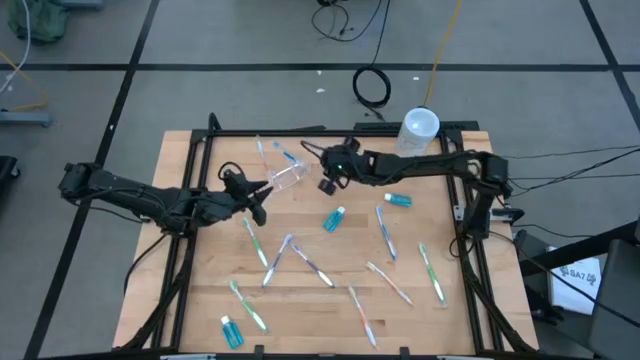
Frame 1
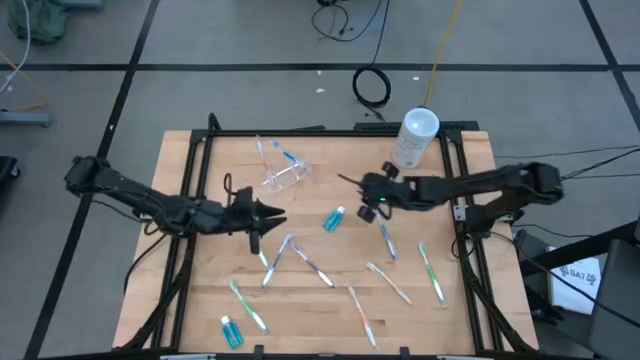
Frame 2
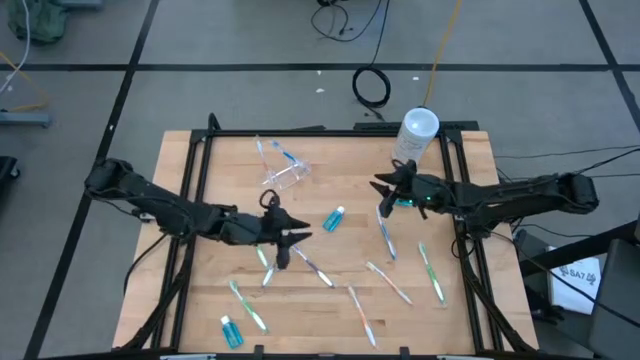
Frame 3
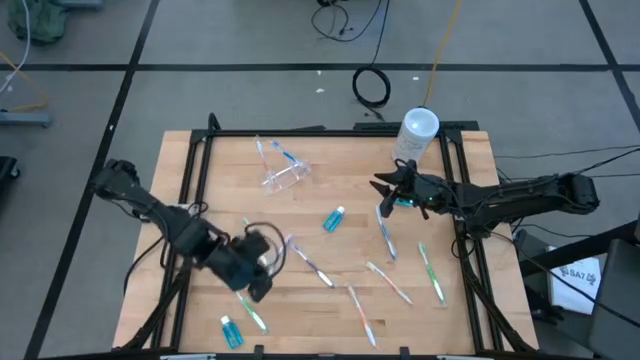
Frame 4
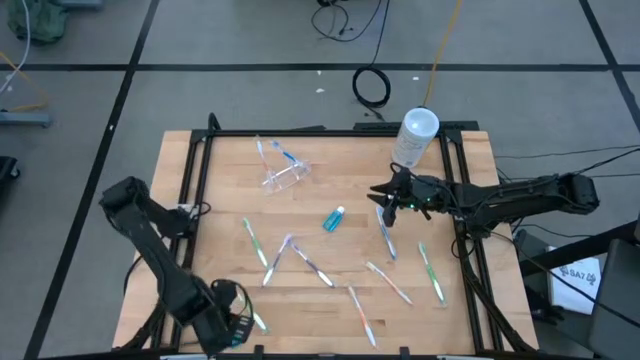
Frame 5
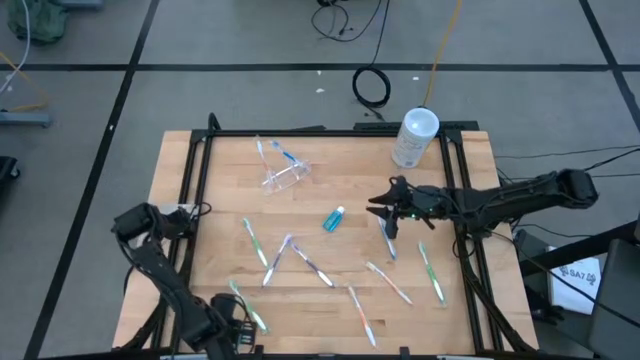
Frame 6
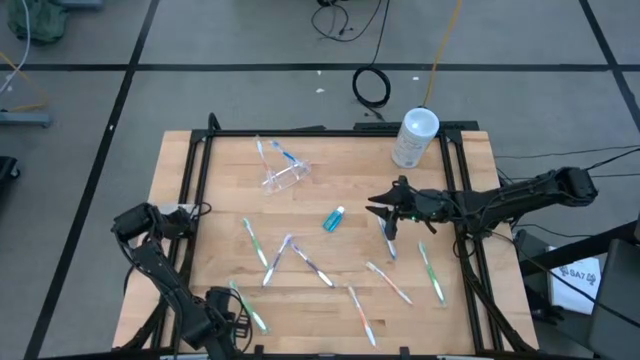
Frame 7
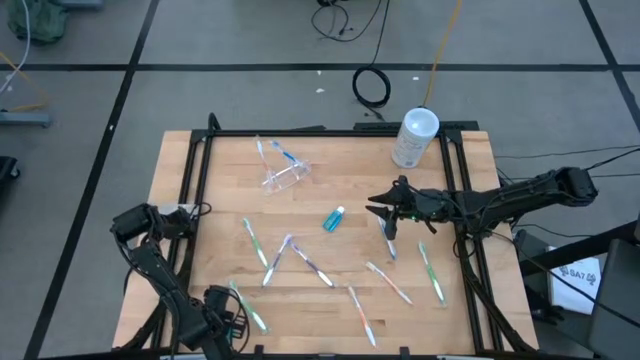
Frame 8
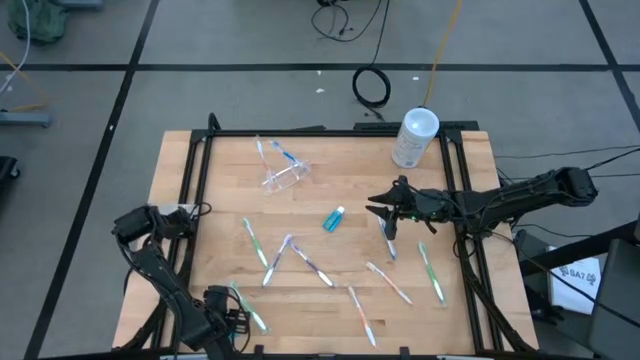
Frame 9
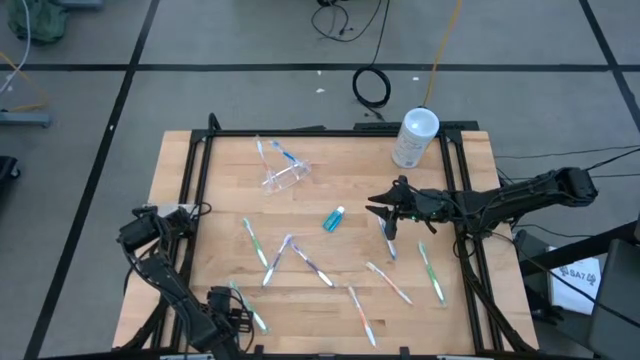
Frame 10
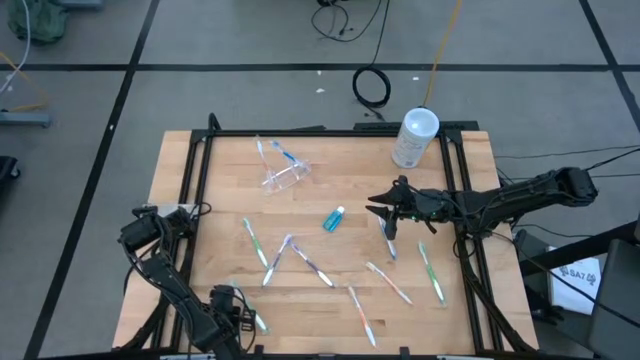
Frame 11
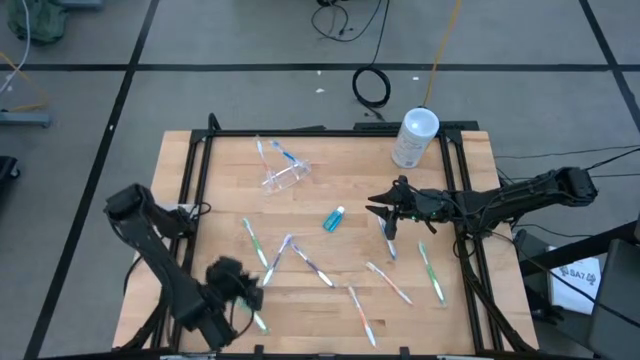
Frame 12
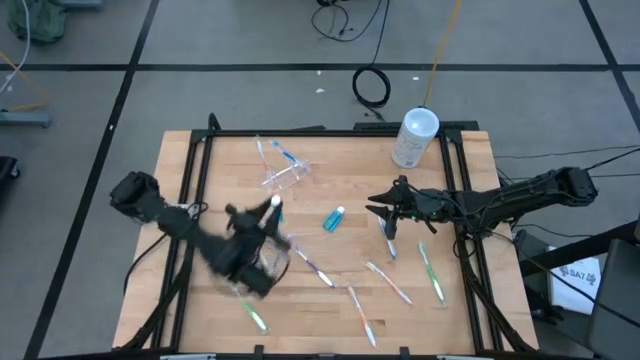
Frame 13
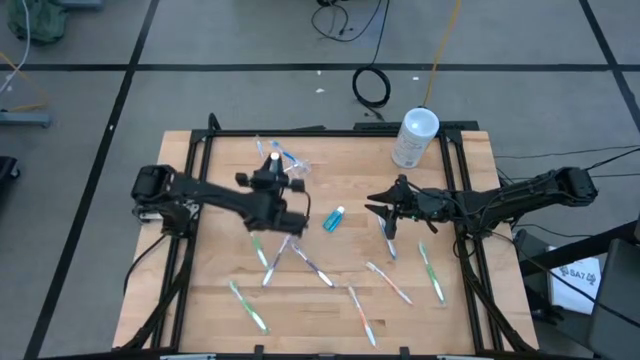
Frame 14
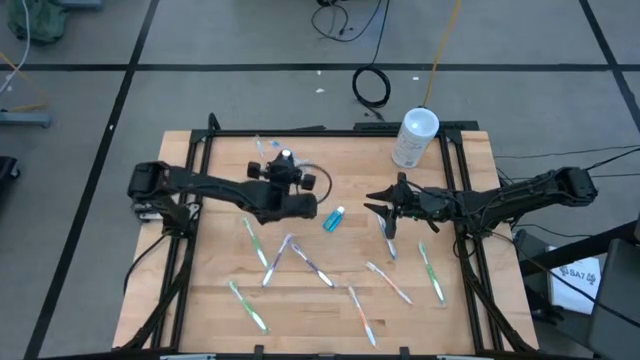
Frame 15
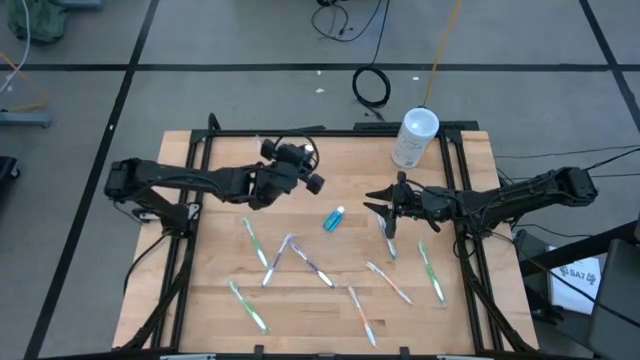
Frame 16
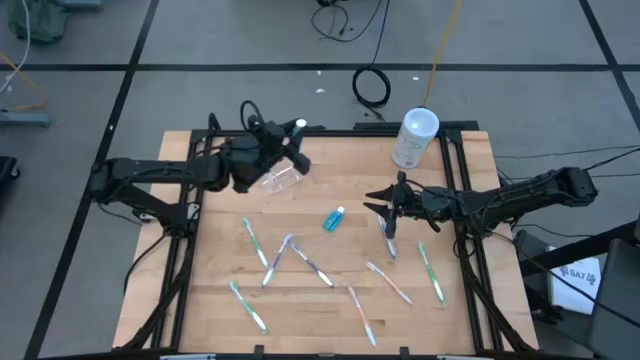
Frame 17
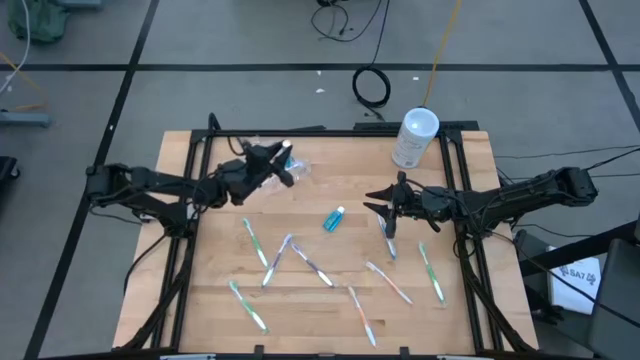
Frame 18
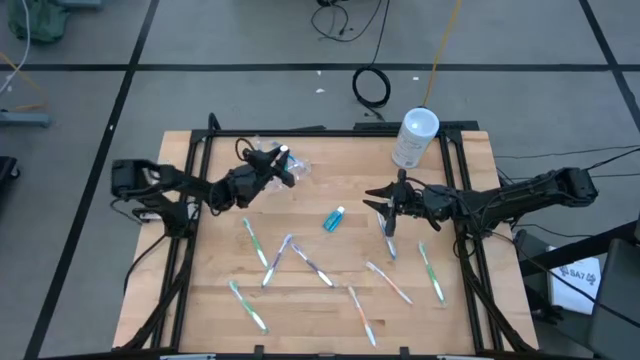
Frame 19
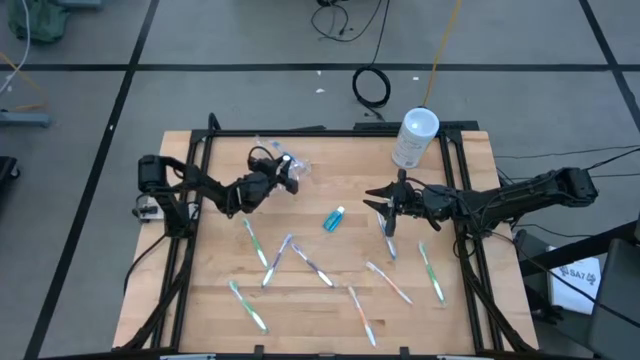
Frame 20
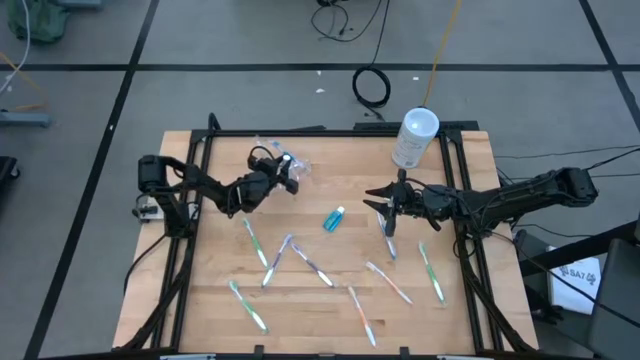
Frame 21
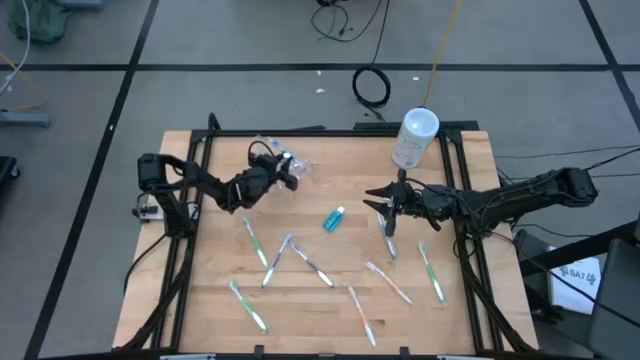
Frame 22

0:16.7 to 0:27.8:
Task: Pick & Place toothbrushing station
Put the mouthwash into the transparent organizer

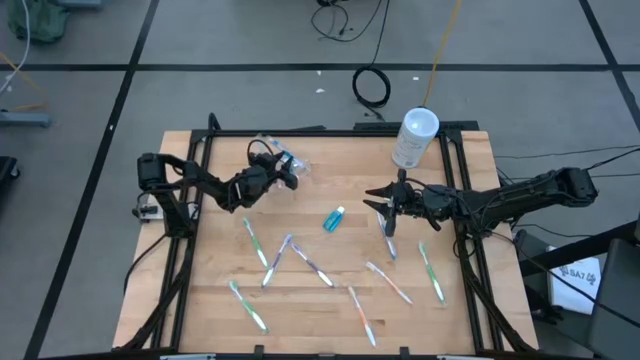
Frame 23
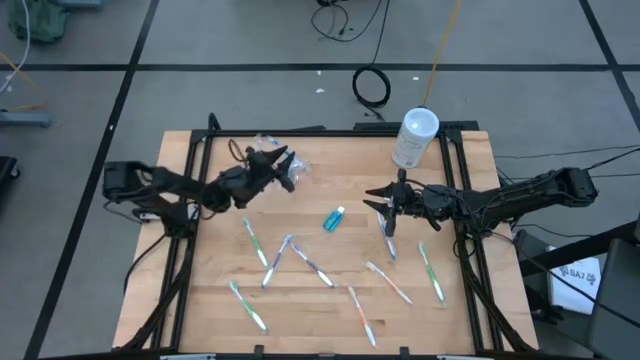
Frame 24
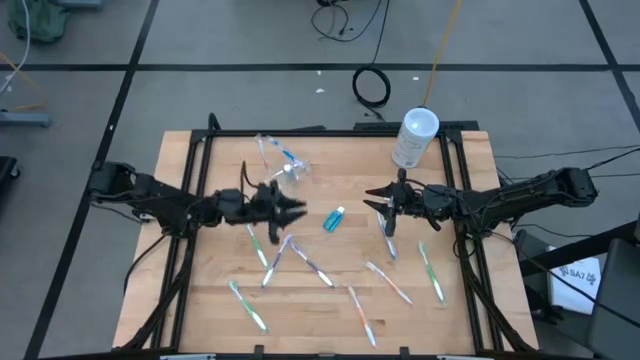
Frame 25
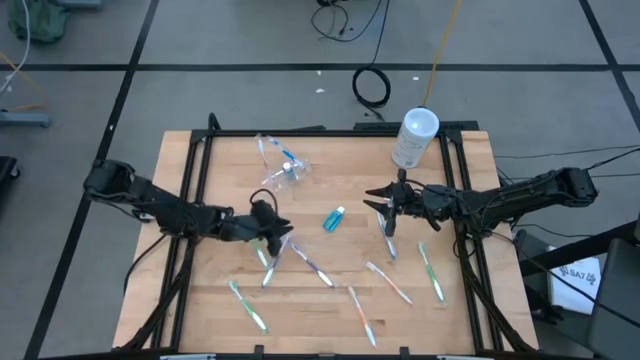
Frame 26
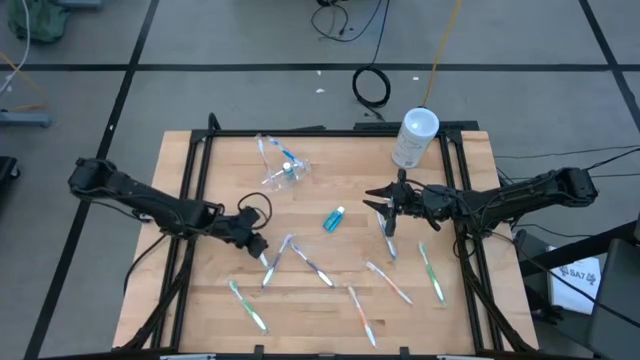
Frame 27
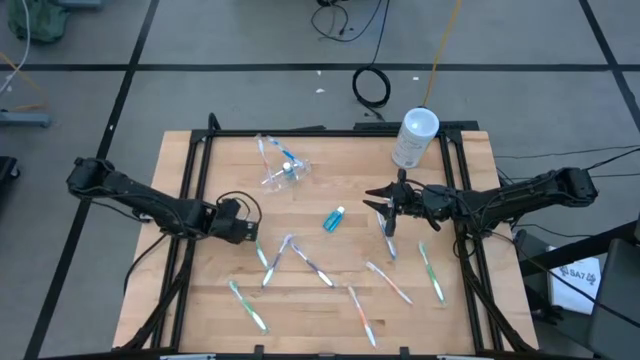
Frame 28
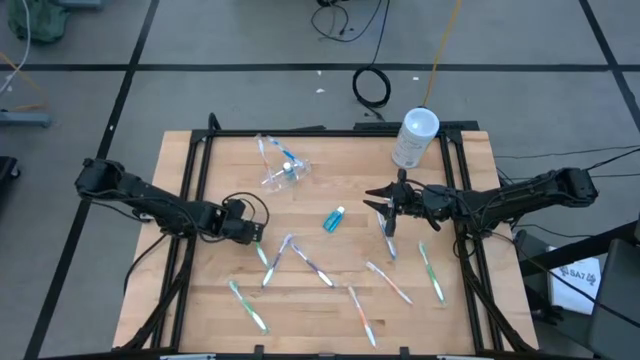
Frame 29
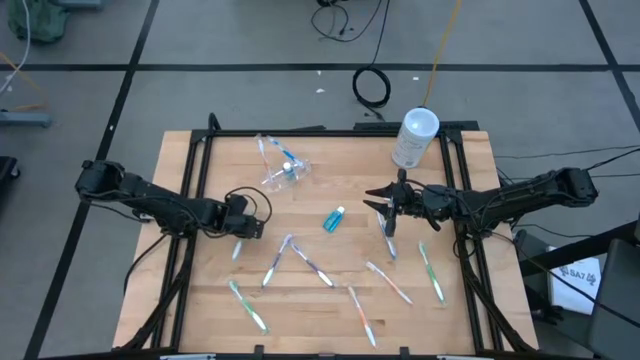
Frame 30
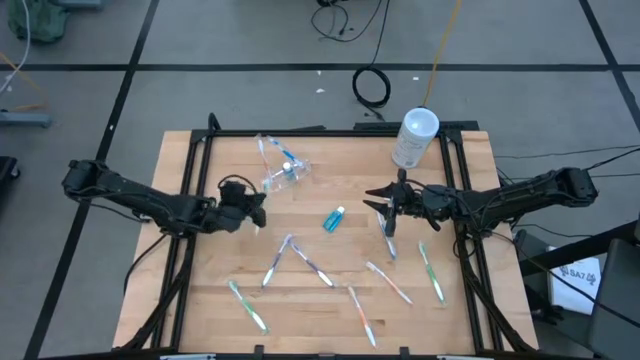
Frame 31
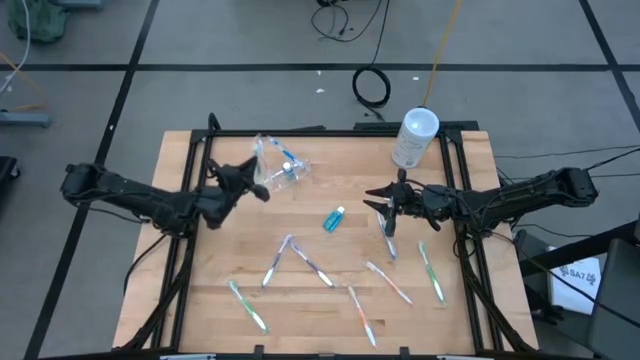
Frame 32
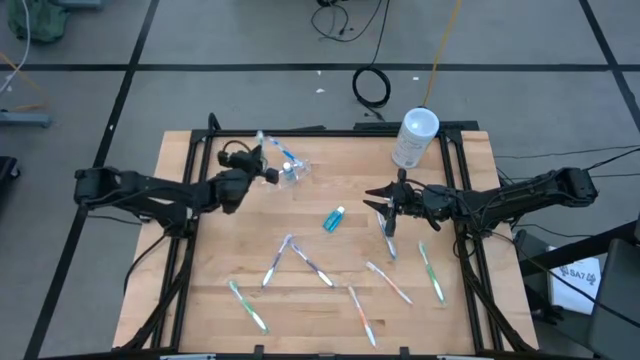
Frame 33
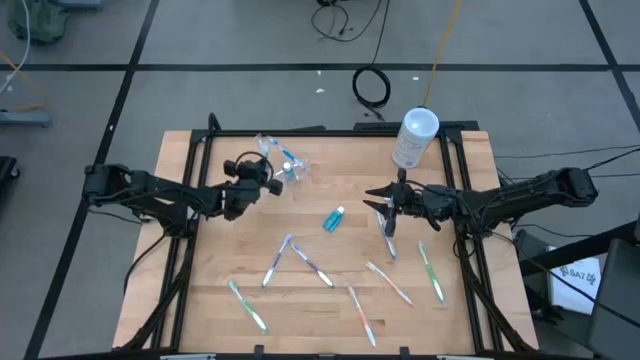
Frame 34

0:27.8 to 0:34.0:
Put the green toothbrush into the transparent organizer

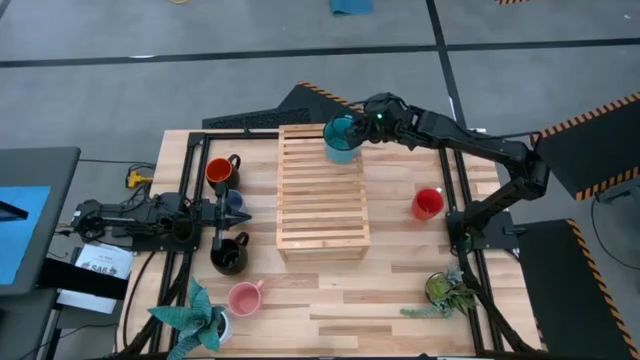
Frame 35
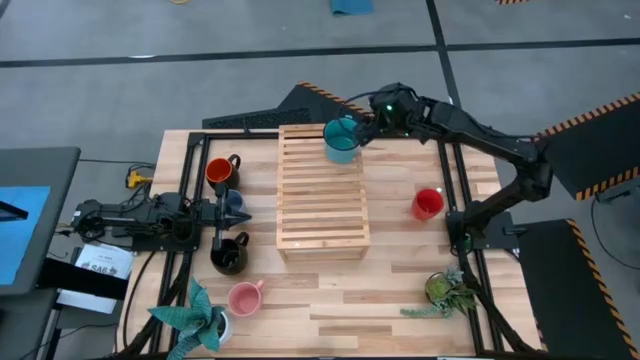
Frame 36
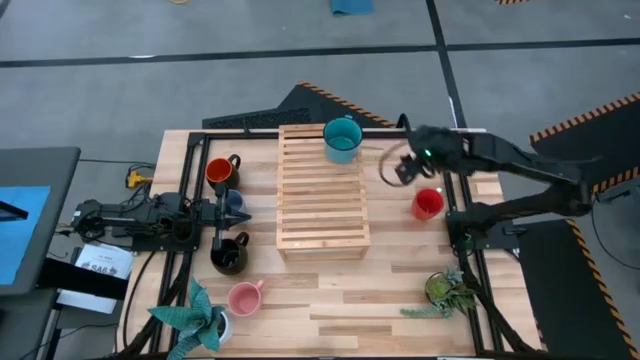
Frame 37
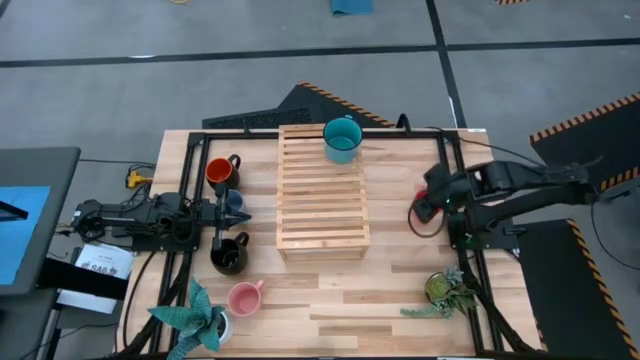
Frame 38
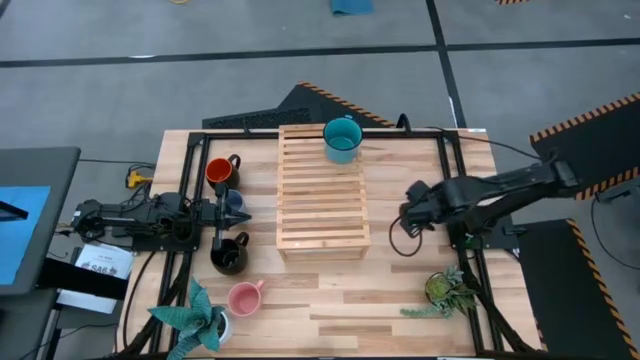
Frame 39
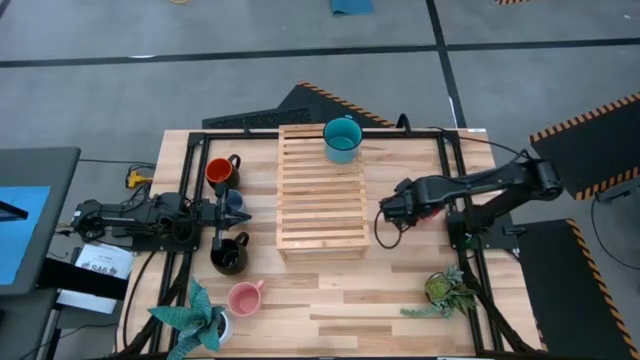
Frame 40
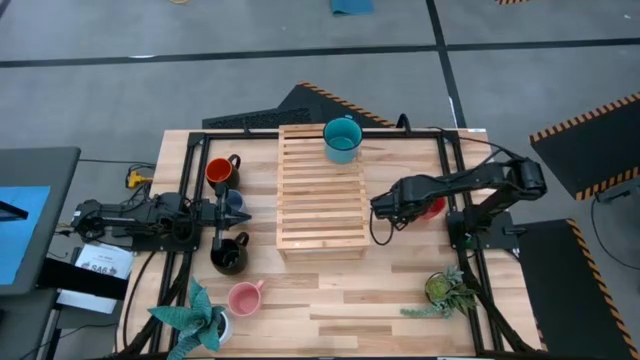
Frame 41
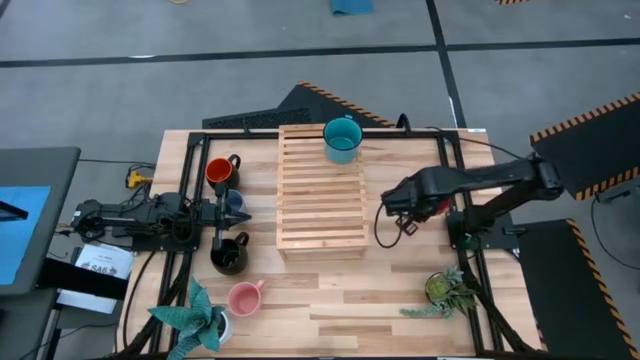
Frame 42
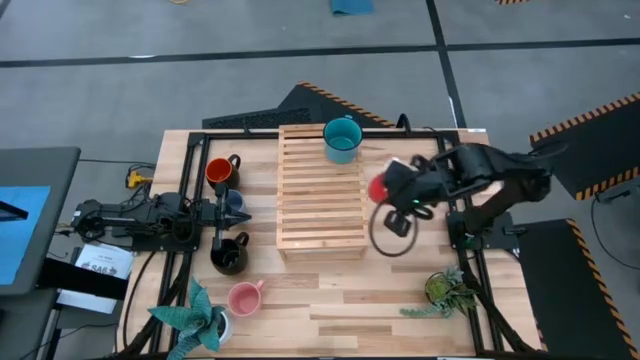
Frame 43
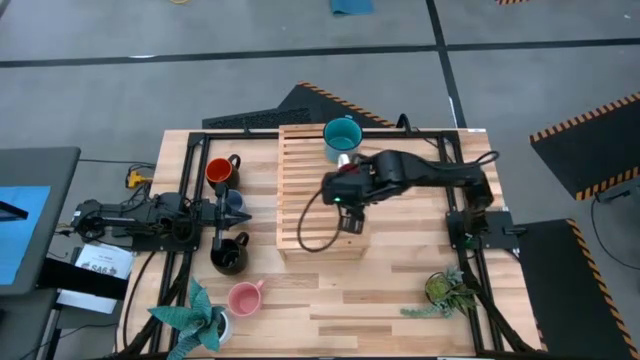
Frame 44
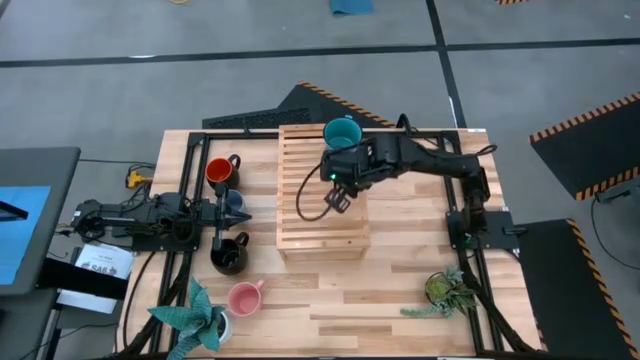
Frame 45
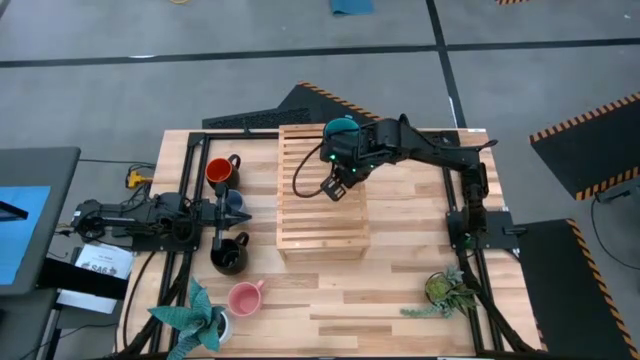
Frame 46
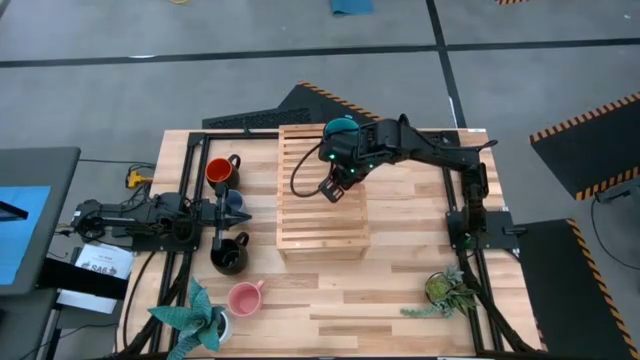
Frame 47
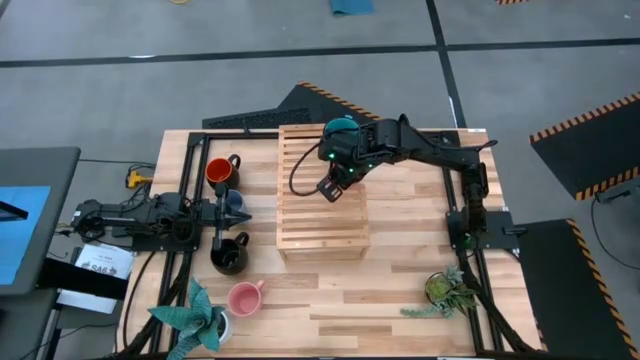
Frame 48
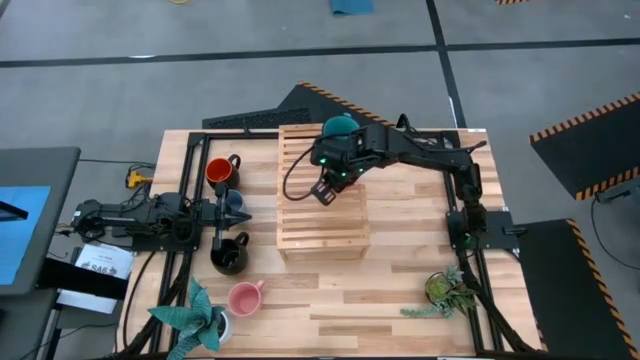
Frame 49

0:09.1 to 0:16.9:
Task: Place coffee mugs
Put the red mug on the shelf aligned with the blue mug
